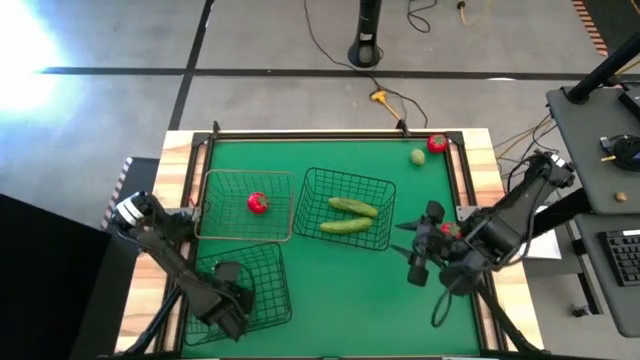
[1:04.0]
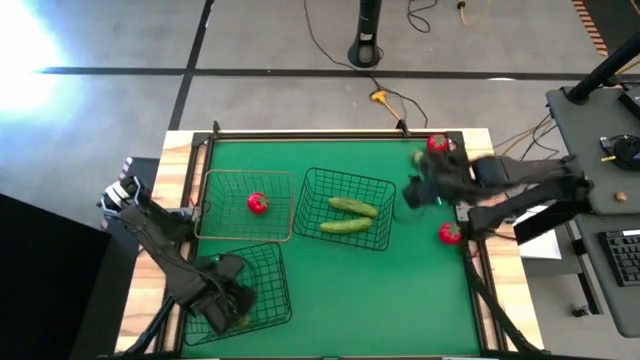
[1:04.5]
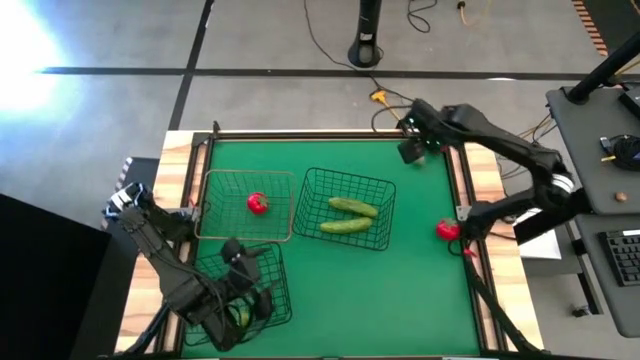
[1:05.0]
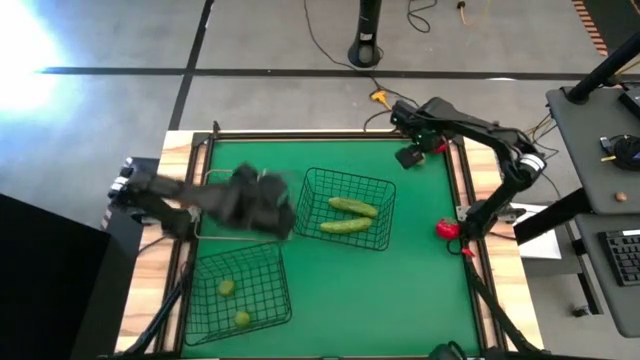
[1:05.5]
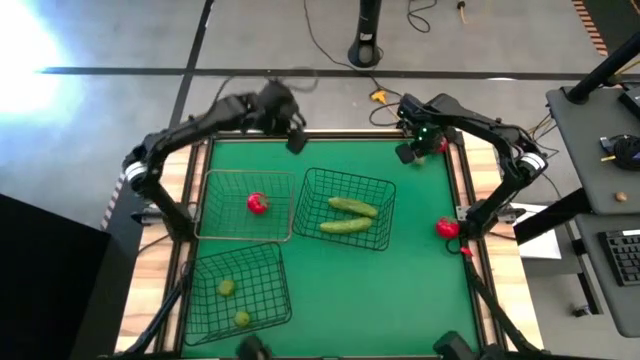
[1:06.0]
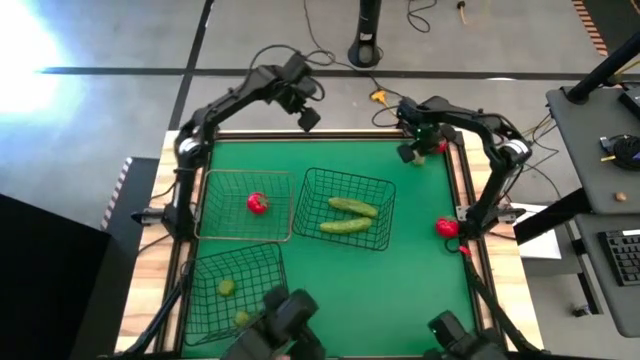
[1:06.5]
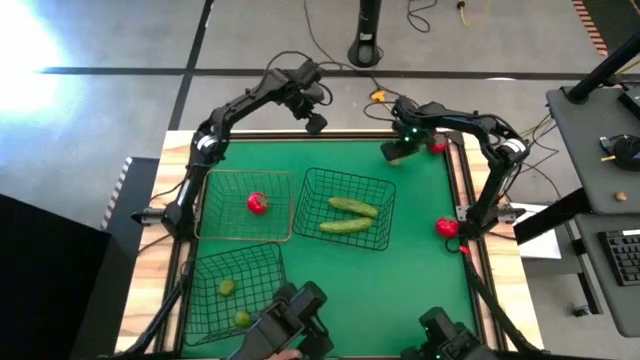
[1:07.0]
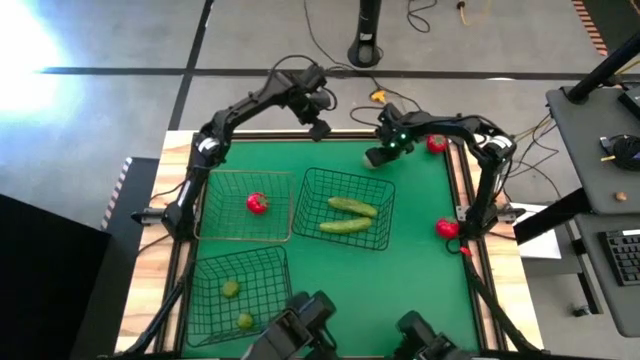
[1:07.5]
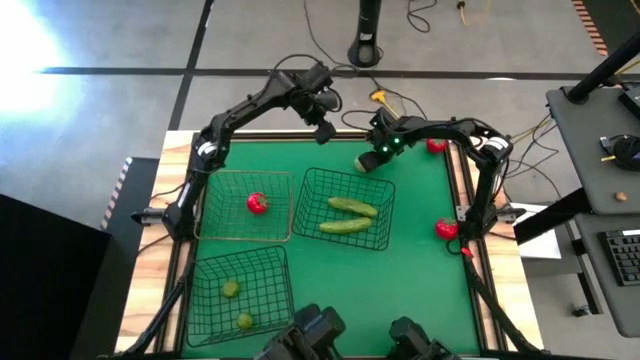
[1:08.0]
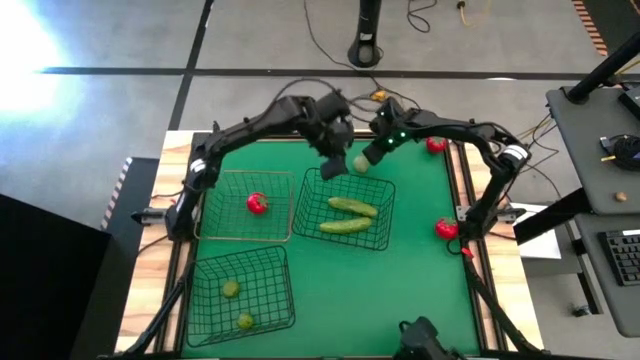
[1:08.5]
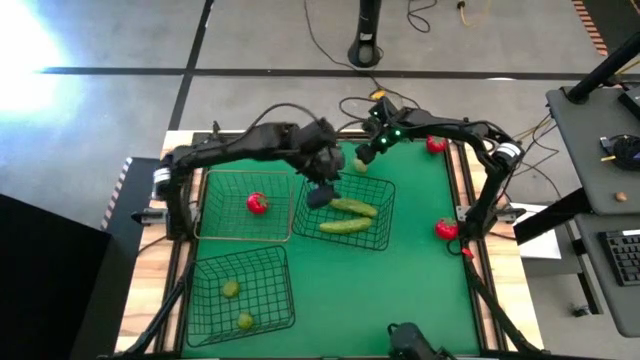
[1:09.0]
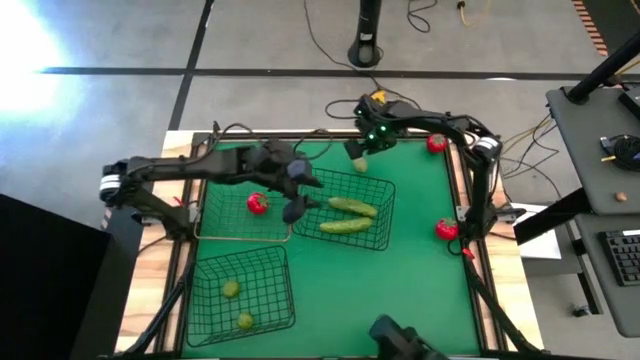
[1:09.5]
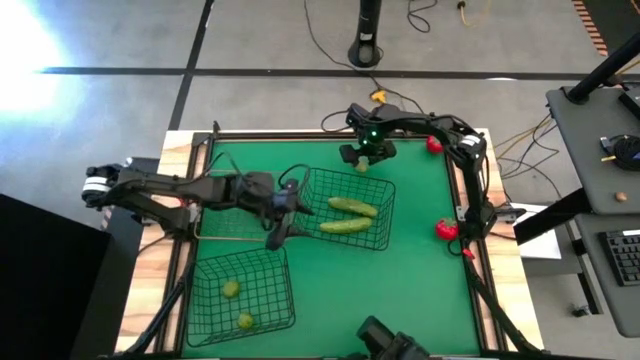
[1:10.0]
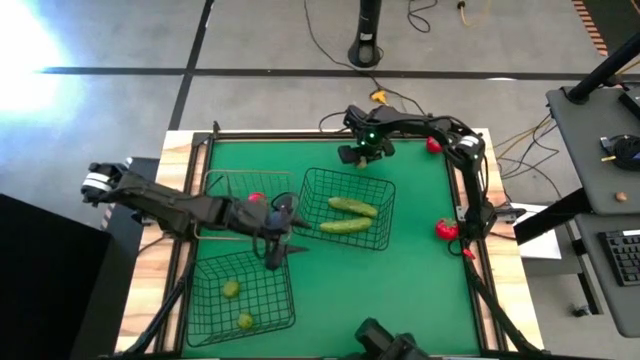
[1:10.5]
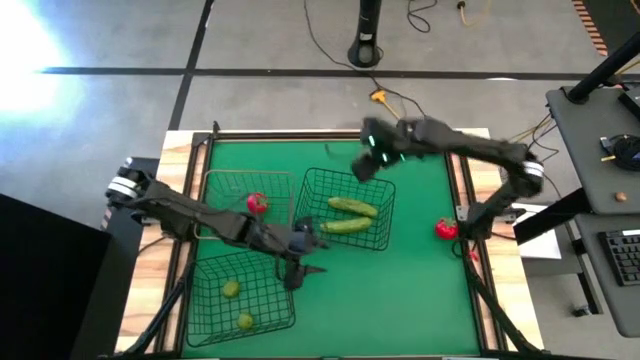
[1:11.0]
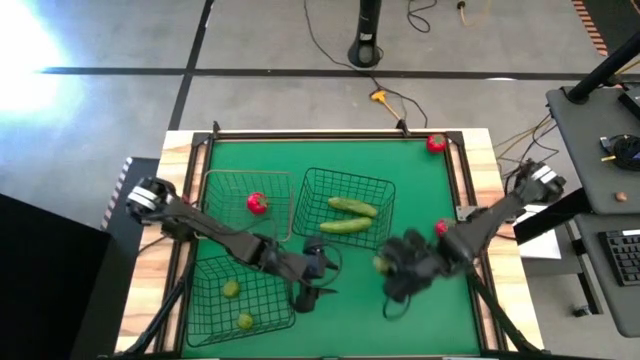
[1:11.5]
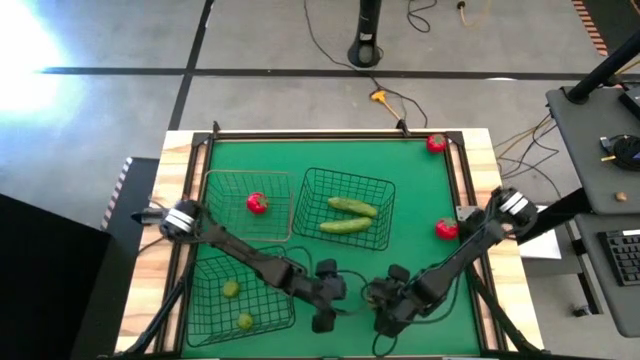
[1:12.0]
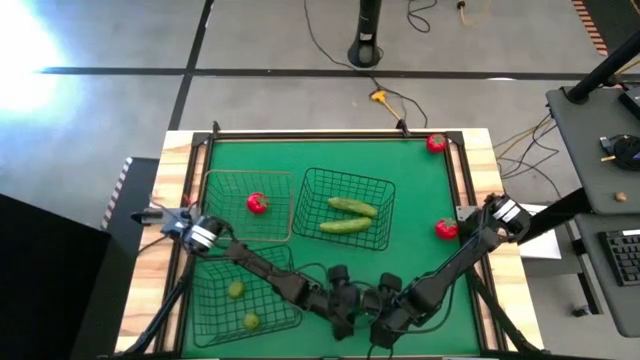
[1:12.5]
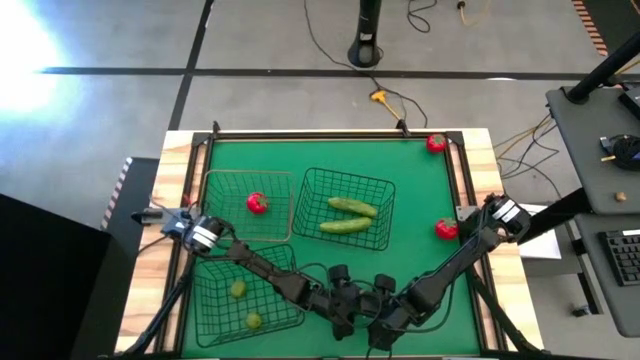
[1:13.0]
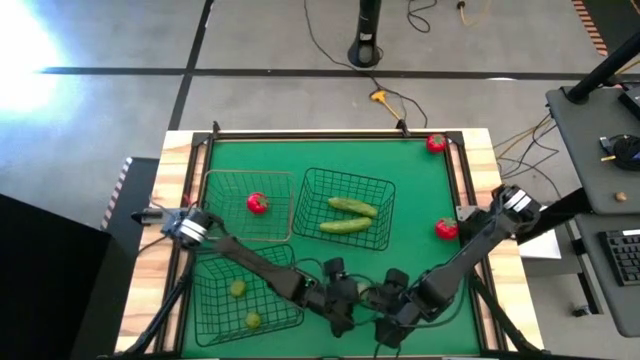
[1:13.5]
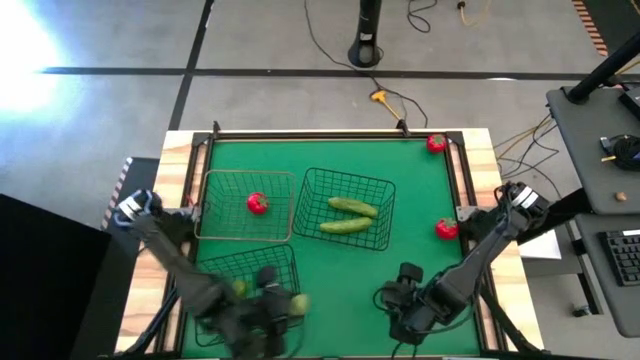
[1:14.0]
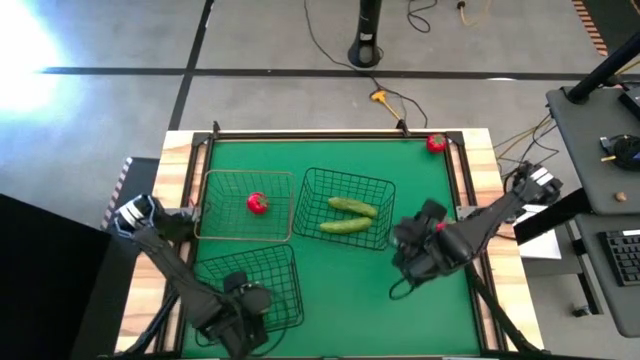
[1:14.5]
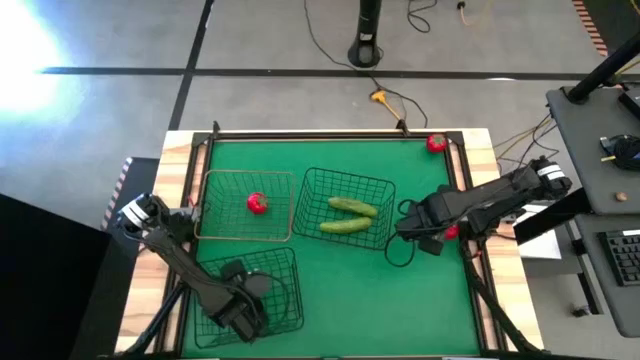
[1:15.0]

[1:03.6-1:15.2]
Task: Sort produce into baskets
Put the lime into the bottom black wire basket

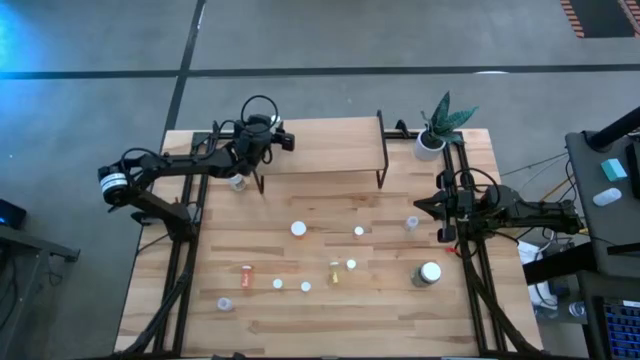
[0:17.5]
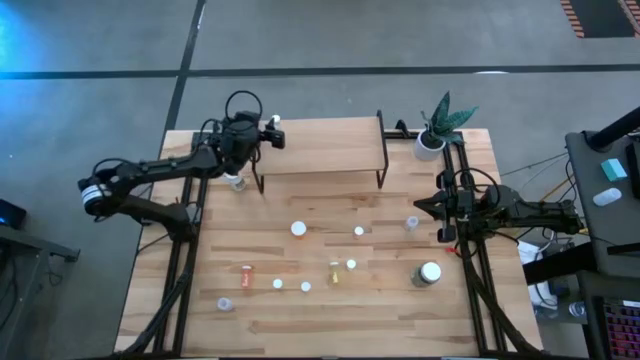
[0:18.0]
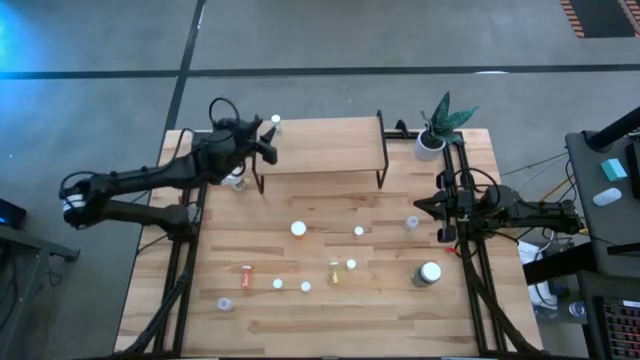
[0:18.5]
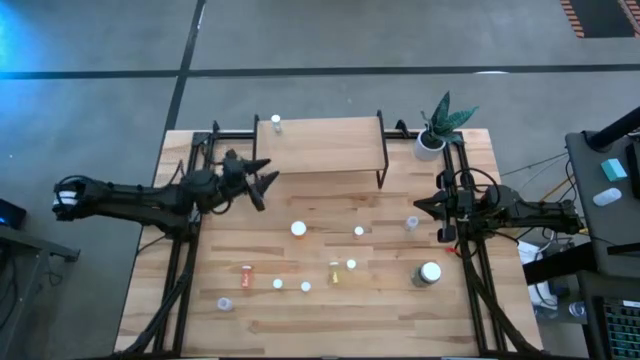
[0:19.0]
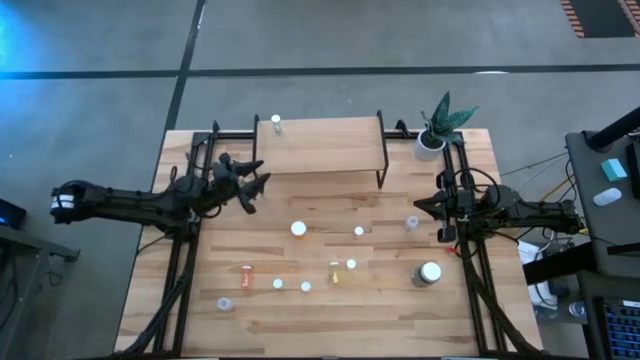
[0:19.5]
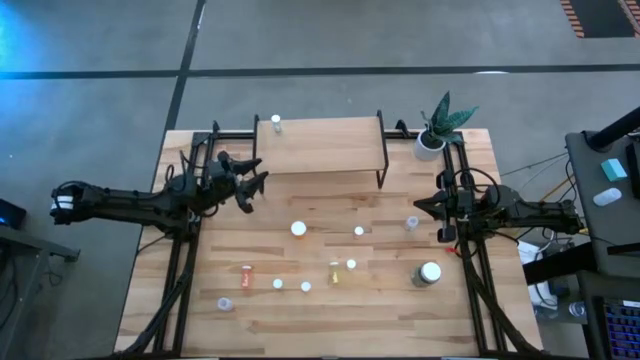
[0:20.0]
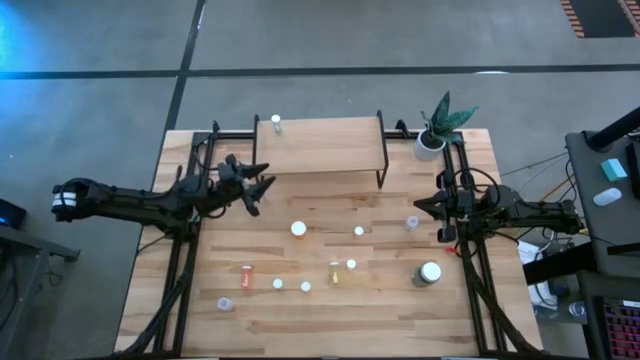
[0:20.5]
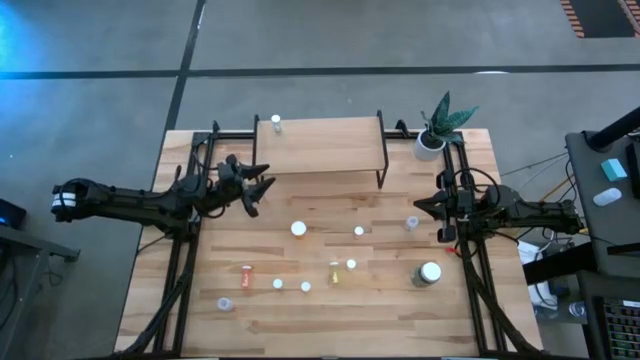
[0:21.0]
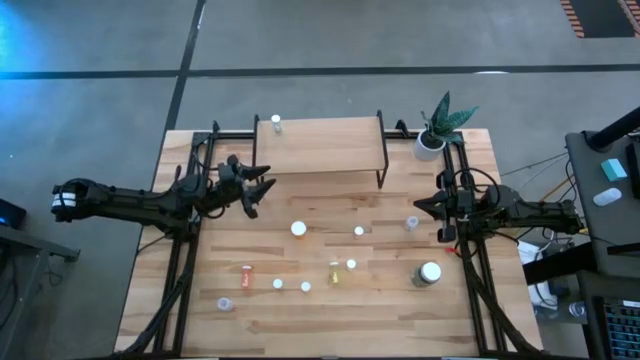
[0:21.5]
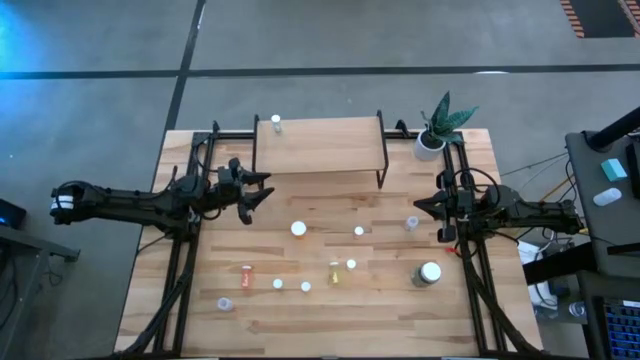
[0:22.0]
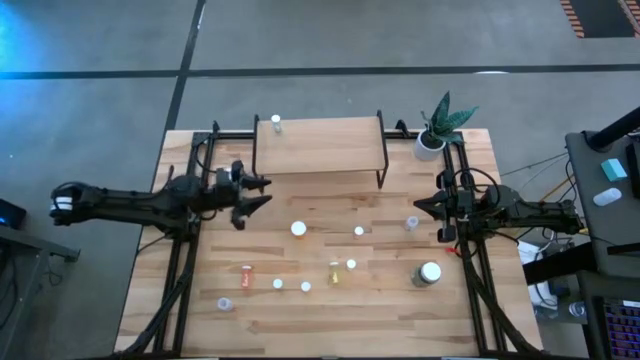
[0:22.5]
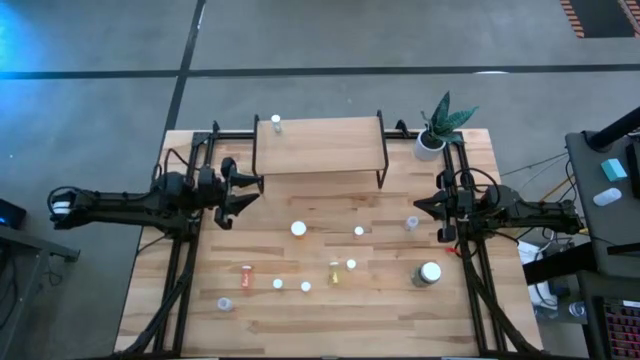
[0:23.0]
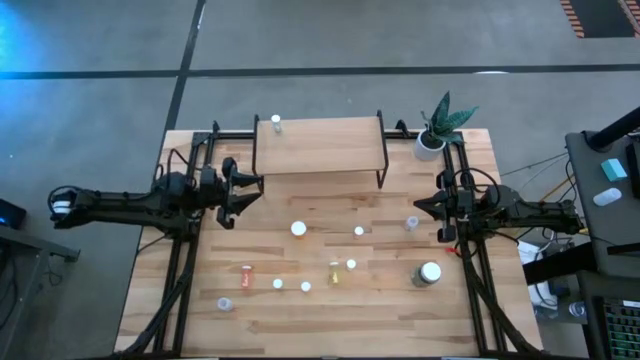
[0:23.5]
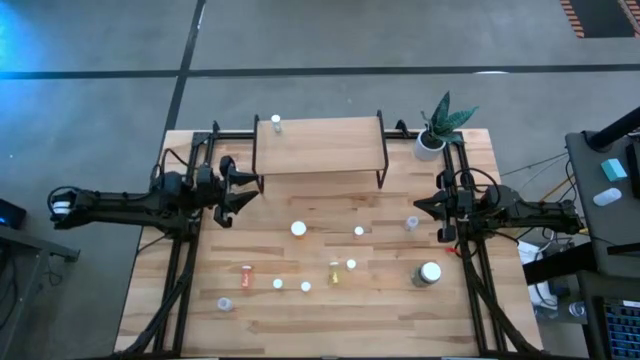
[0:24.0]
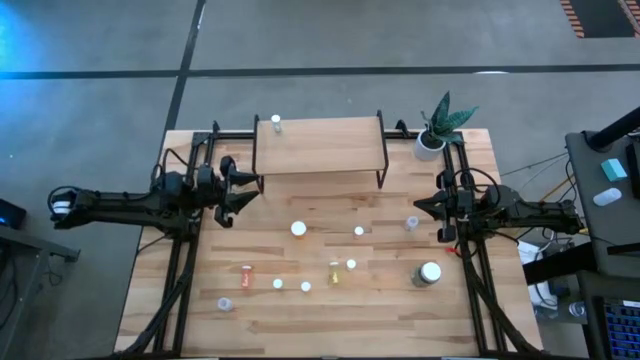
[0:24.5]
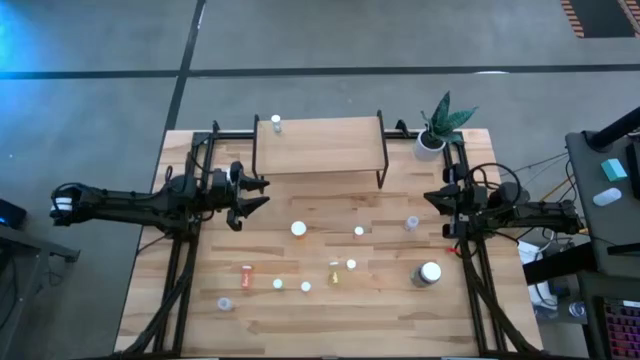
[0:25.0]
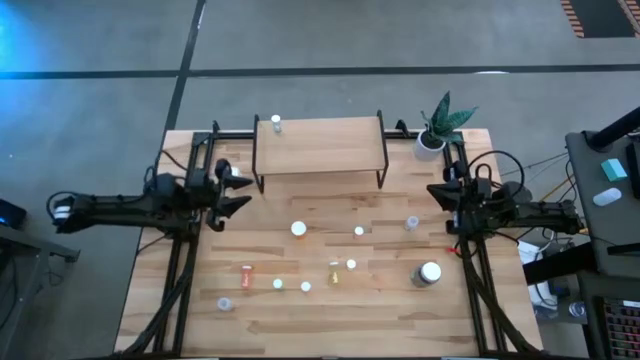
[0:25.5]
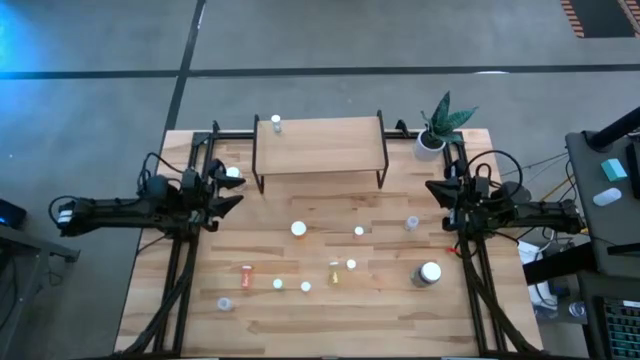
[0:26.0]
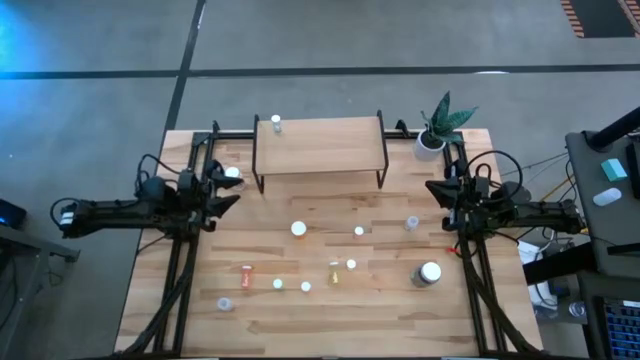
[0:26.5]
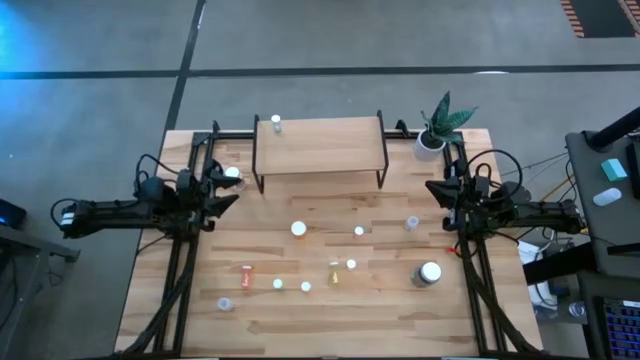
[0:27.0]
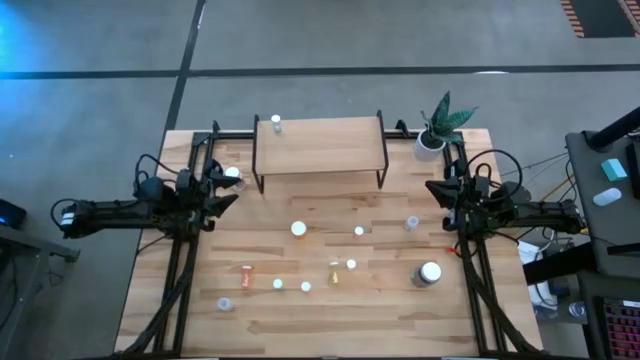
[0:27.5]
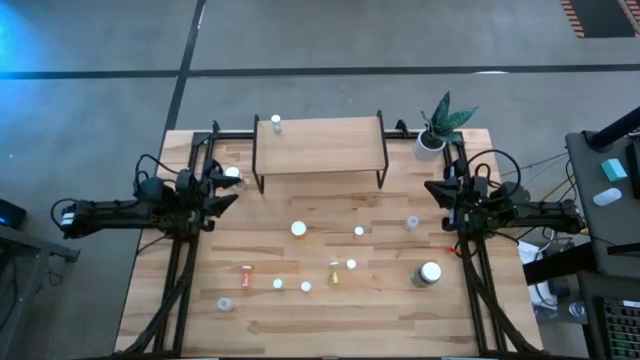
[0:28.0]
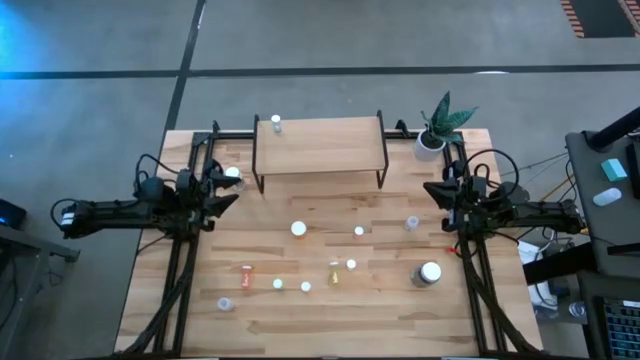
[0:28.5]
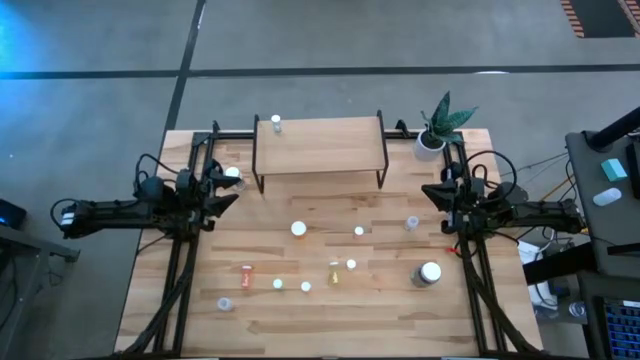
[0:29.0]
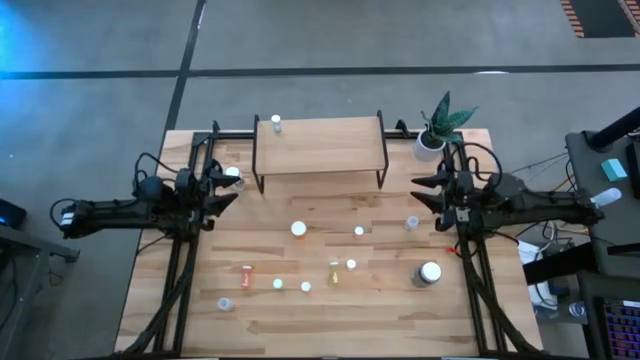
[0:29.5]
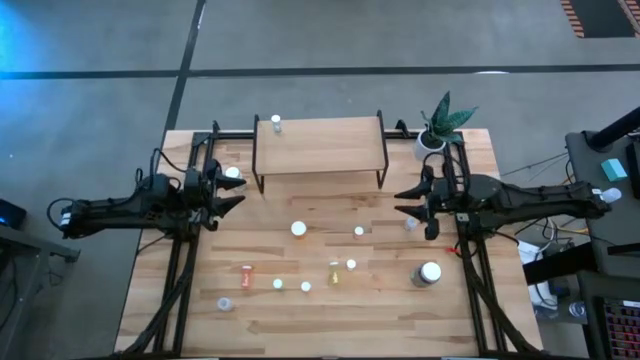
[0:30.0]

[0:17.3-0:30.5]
Task: Pick and place medicine bottles onto shelf by color
Put the right pink medicine bottle on the shelf
